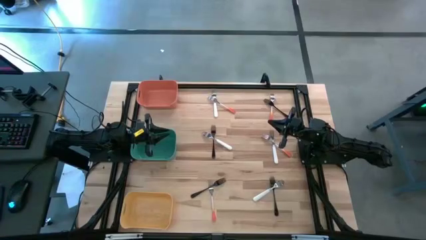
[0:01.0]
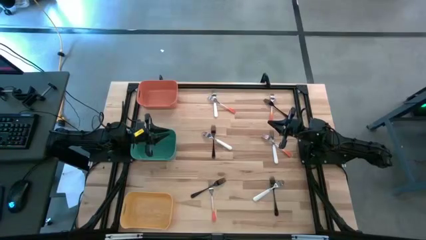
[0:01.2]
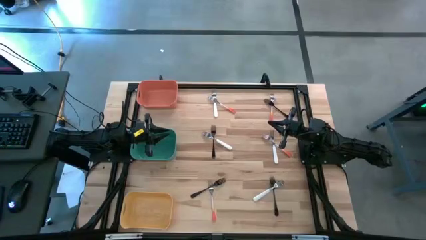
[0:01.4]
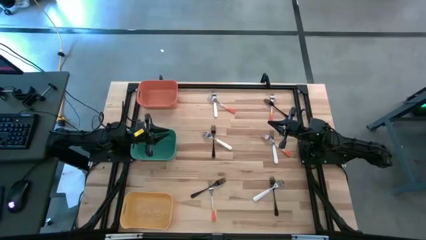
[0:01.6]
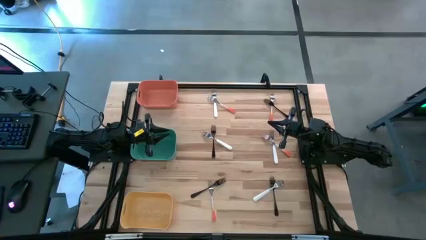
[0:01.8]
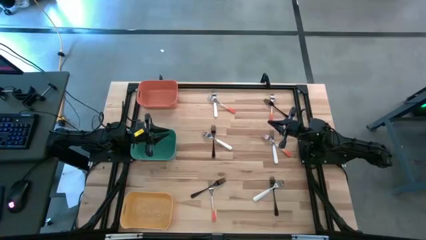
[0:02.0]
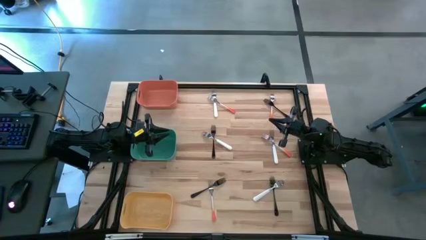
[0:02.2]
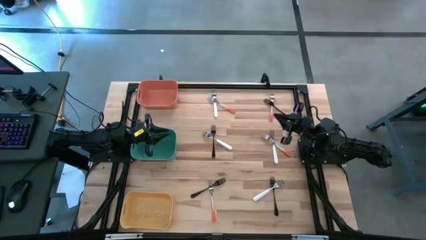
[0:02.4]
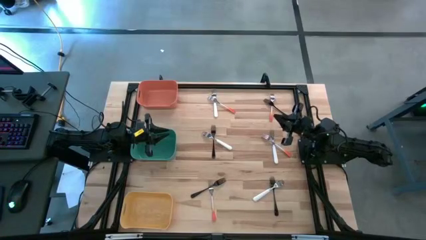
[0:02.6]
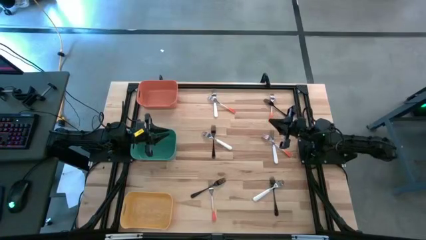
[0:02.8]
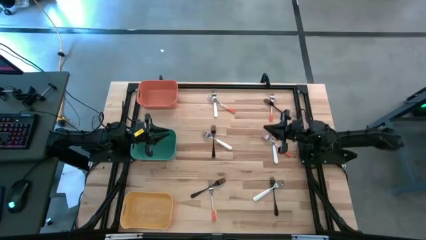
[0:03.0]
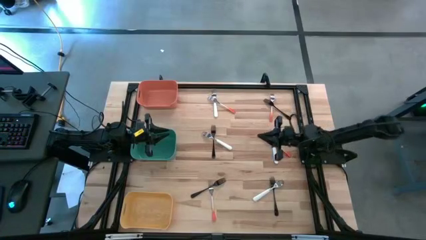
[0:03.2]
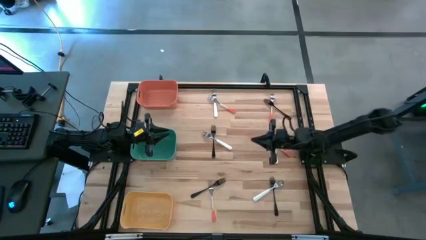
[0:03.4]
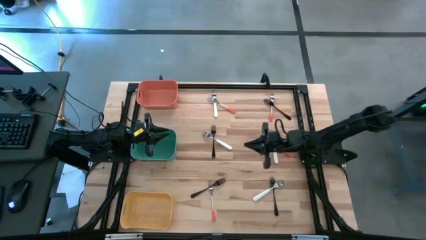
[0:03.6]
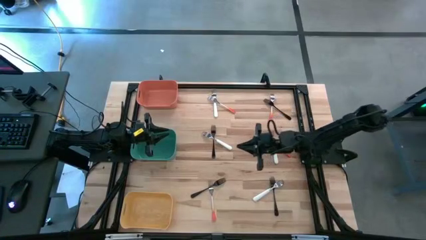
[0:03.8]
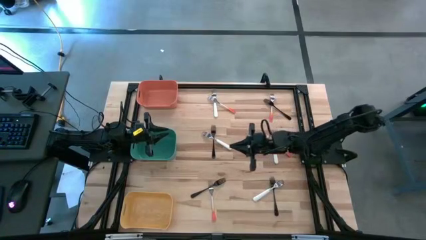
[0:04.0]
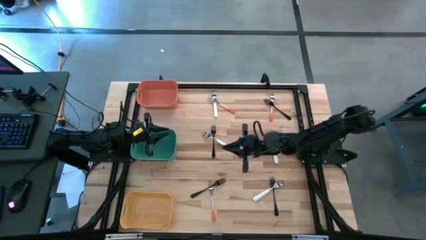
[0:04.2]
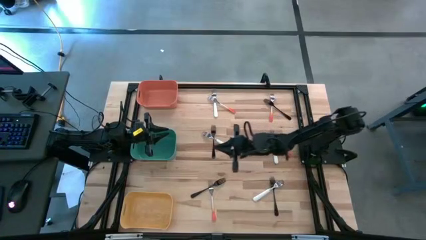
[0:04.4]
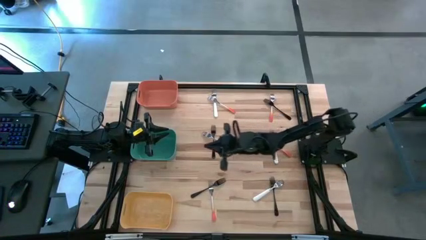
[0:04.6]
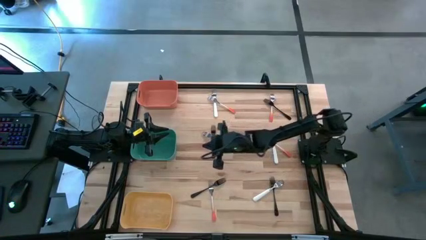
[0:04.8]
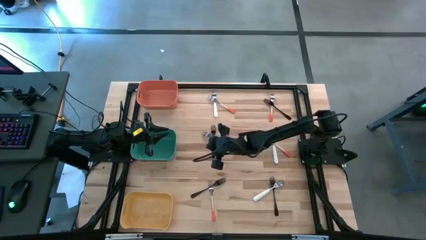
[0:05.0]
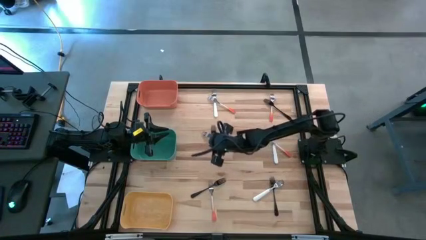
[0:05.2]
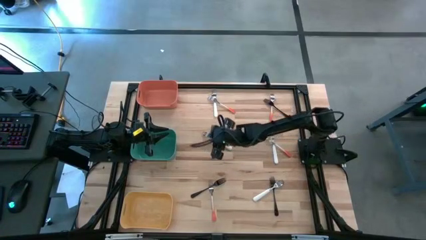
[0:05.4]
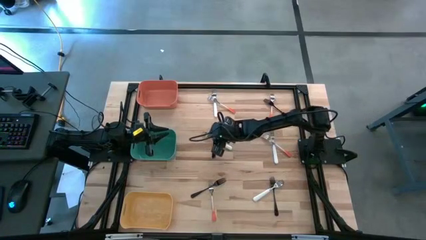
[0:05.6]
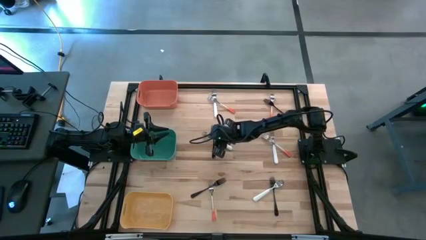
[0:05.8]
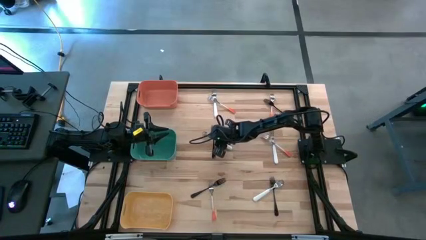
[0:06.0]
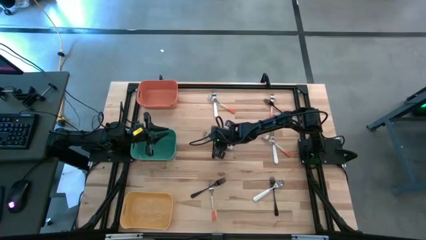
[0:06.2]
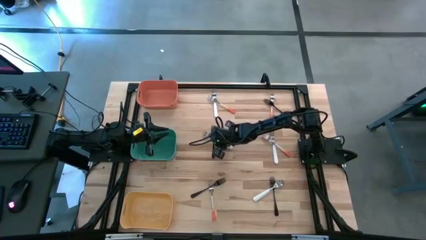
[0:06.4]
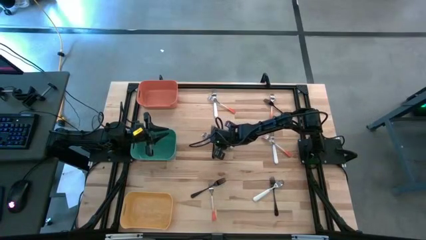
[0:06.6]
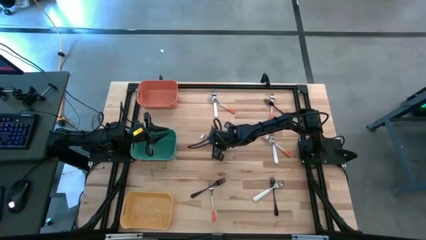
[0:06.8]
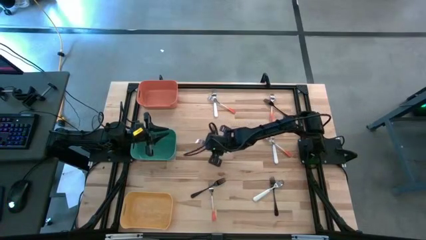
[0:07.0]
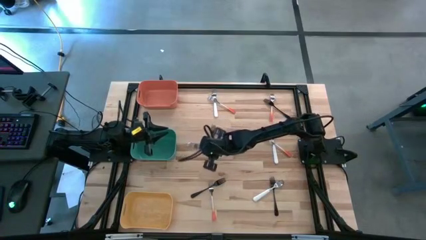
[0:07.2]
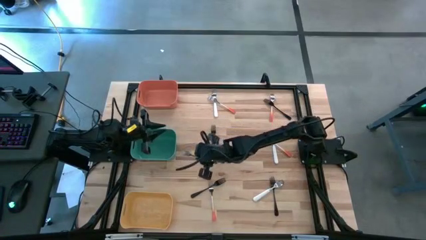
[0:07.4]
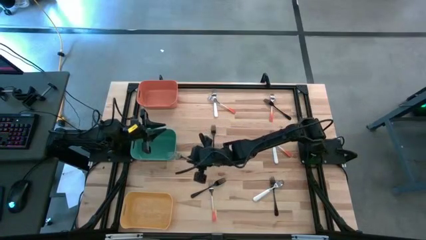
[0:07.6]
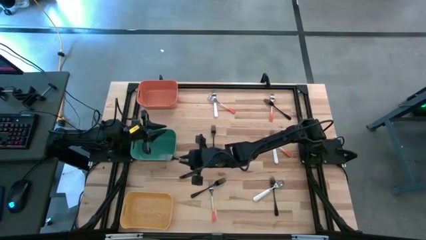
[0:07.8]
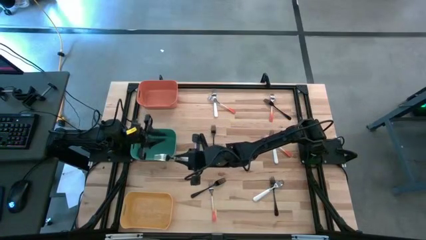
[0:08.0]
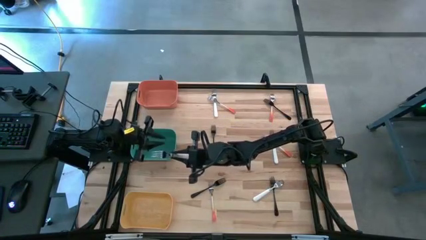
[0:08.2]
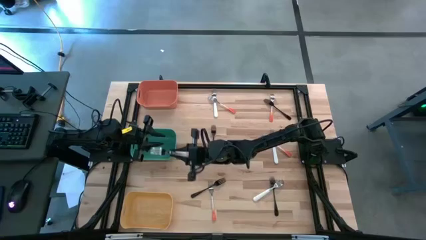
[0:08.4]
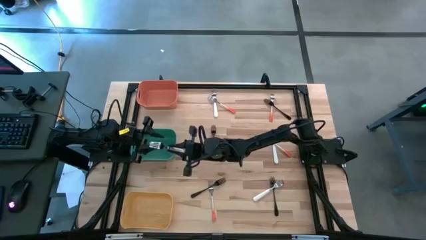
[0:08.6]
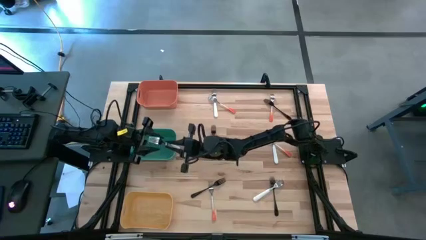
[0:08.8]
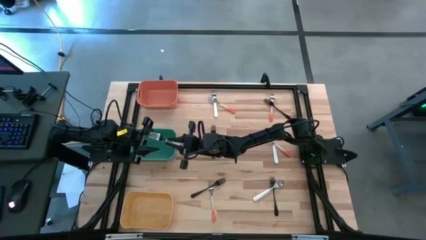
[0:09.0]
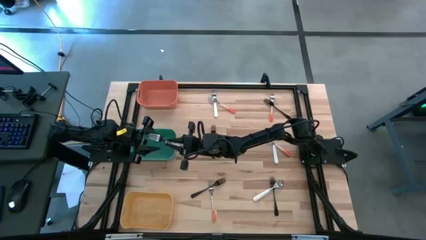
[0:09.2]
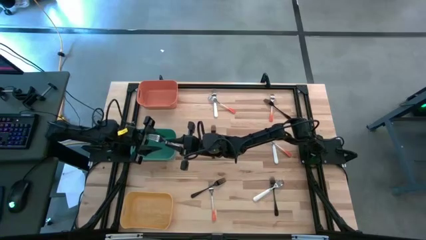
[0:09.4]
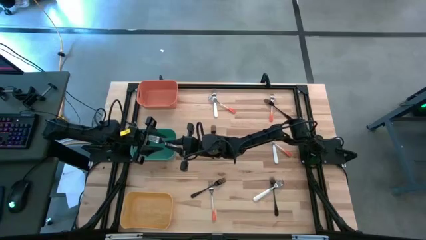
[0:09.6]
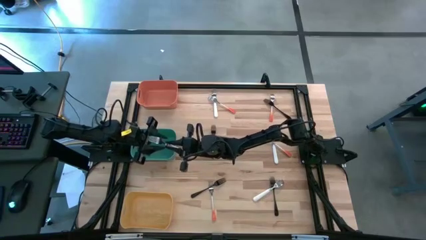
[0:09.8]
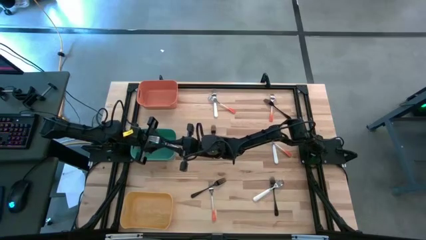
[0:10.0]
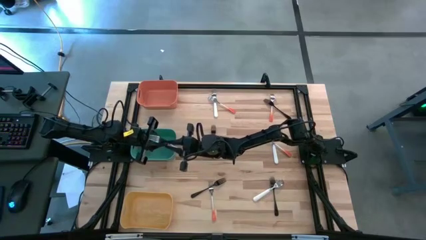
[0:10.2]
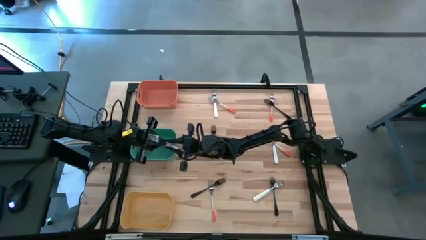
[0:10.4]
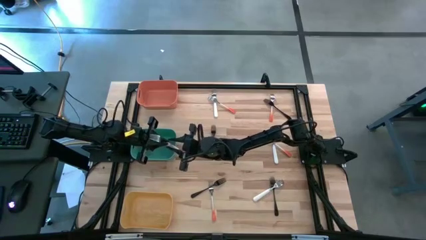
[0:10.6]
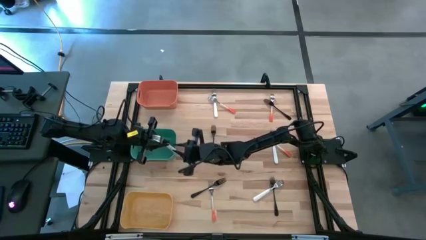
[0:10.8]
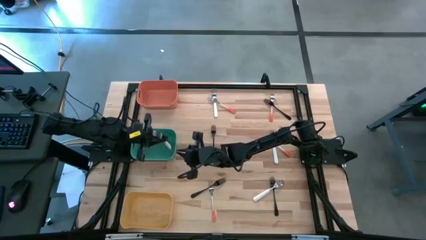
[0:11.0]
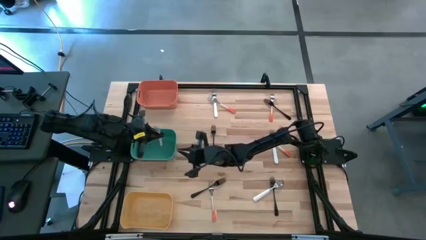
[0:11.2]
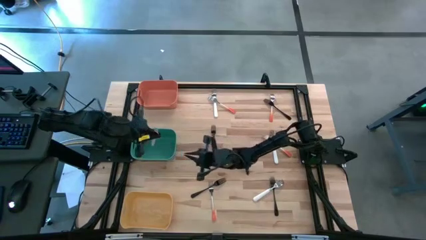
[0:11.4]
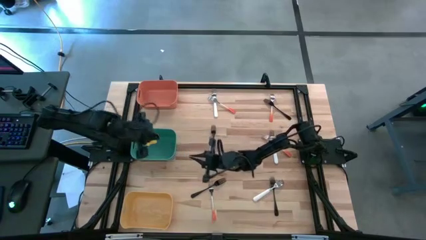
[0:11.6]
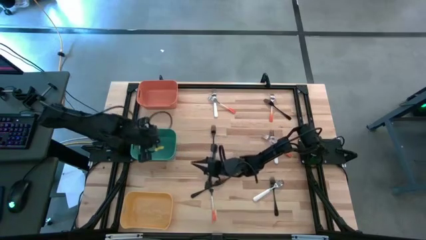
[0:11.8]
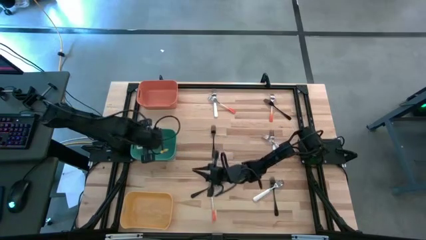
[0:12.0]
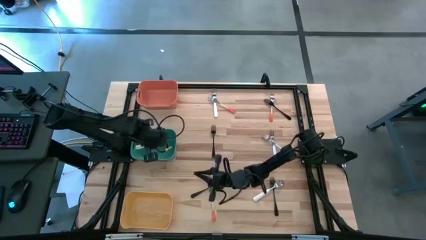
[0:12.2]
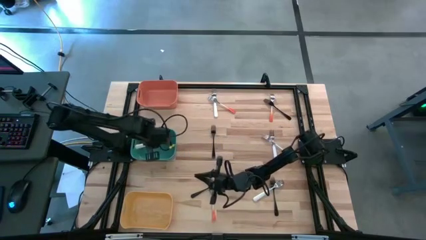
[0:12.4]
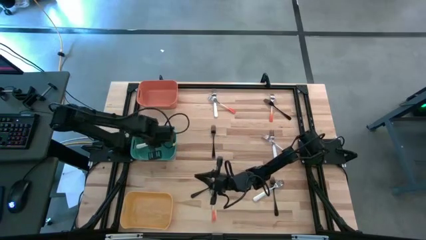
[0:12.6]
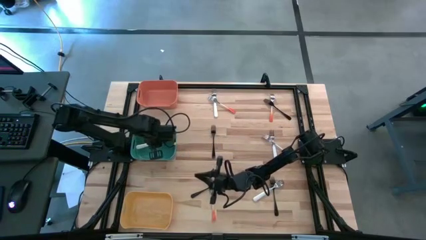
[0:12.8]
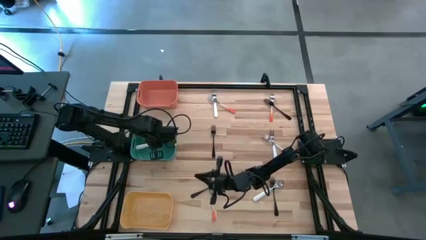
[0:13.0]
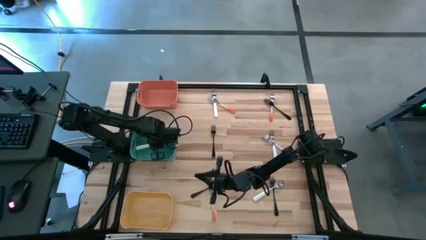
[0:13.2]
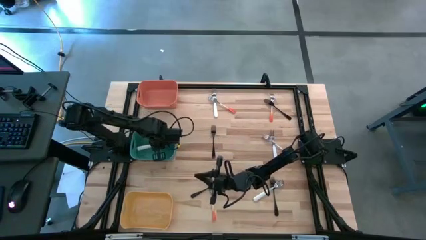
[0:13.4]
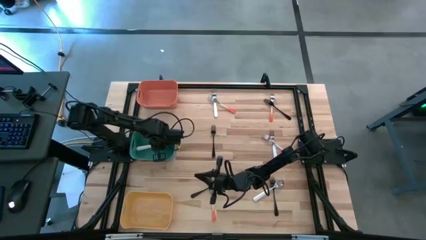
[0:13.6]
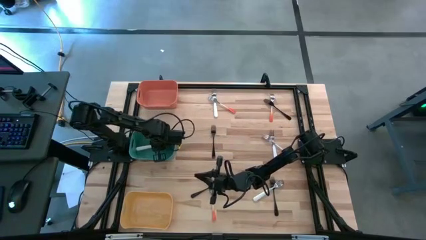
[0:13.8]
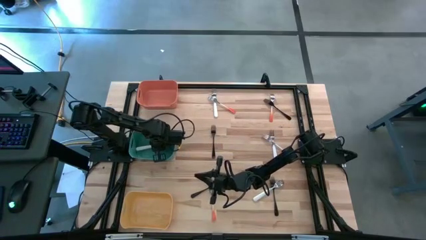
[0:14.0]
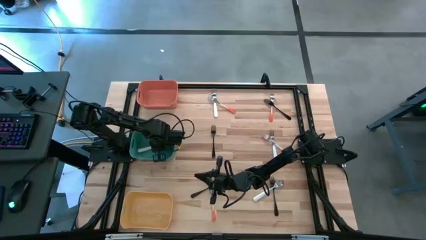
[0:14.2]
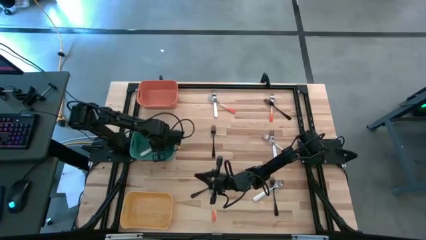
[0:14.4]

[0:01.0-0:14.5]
Task: Sort silverware by color (type)
Put the white fork into the green bin
